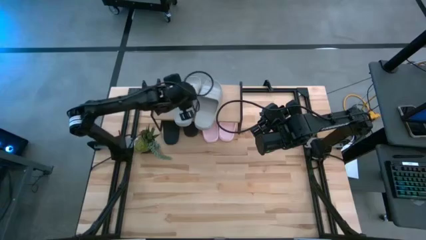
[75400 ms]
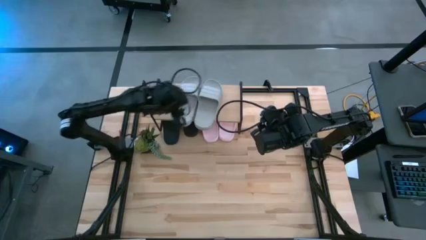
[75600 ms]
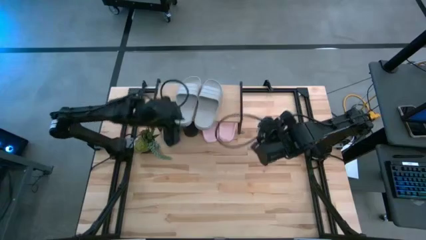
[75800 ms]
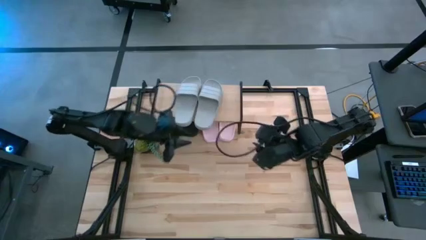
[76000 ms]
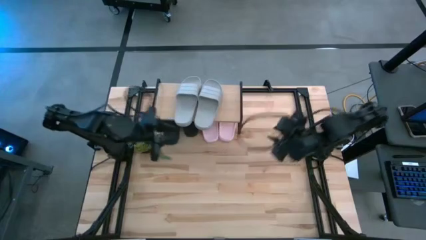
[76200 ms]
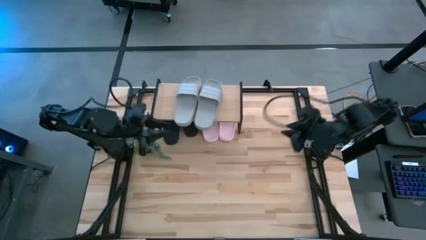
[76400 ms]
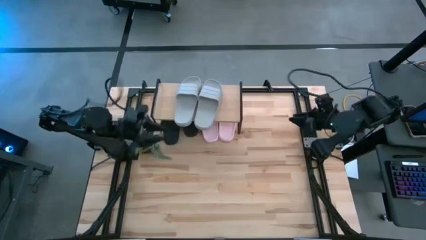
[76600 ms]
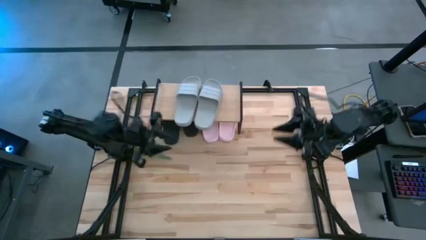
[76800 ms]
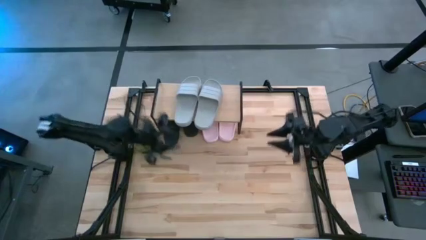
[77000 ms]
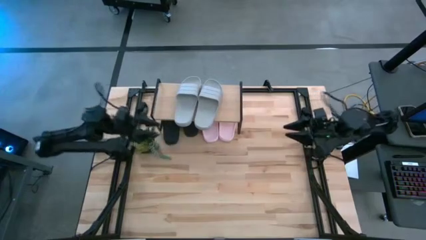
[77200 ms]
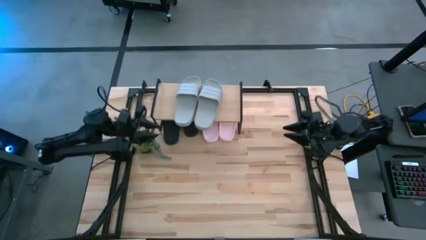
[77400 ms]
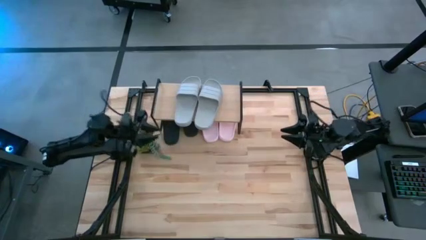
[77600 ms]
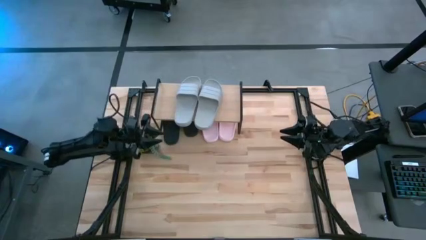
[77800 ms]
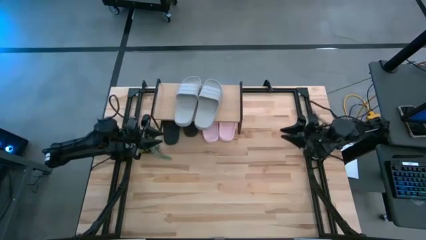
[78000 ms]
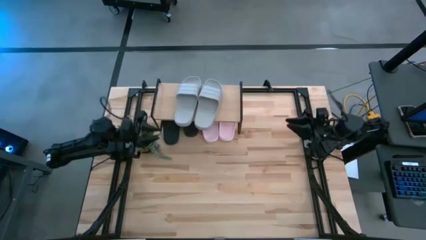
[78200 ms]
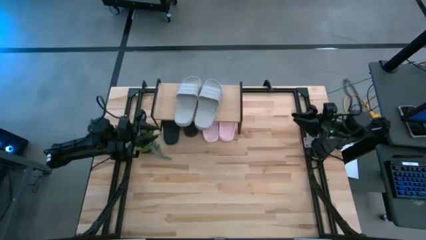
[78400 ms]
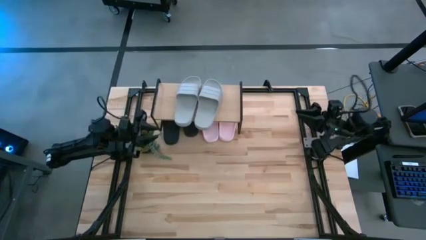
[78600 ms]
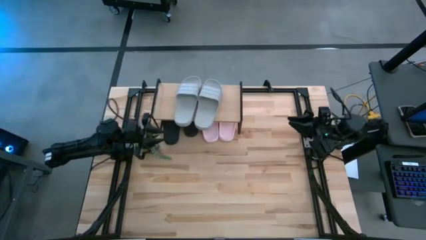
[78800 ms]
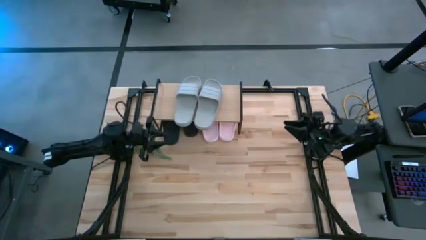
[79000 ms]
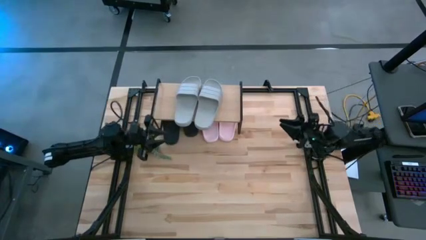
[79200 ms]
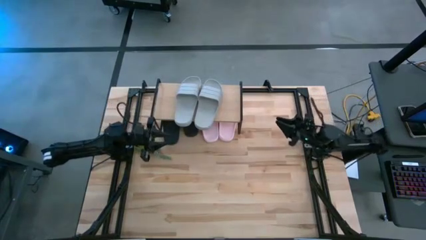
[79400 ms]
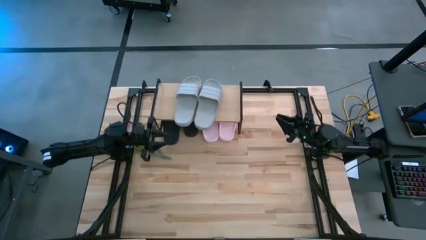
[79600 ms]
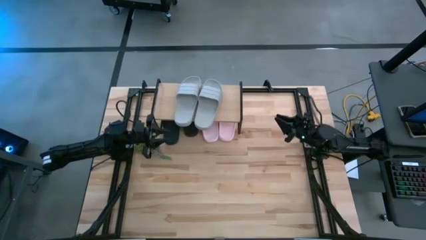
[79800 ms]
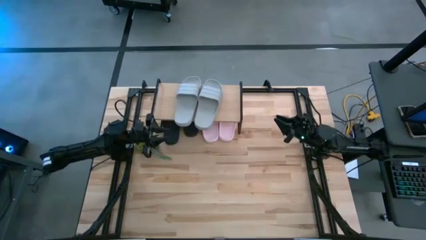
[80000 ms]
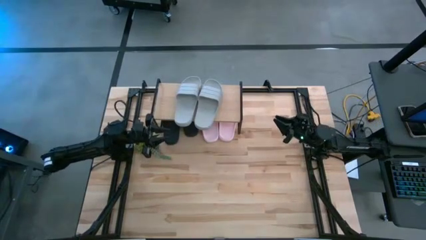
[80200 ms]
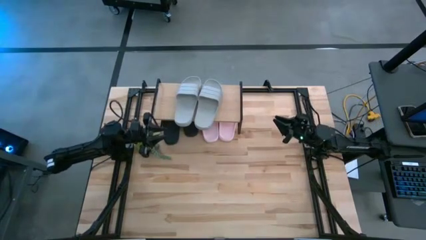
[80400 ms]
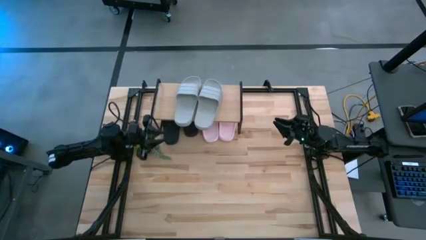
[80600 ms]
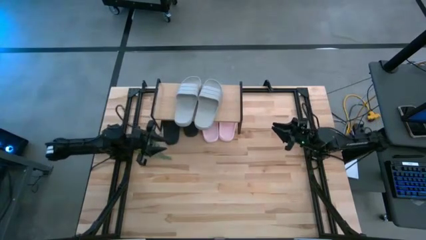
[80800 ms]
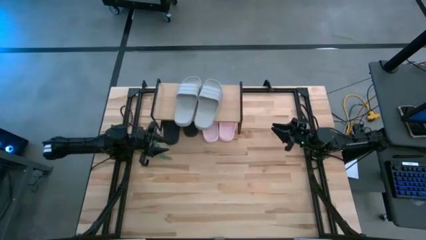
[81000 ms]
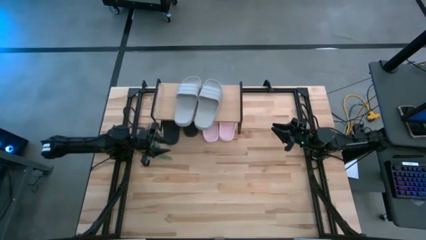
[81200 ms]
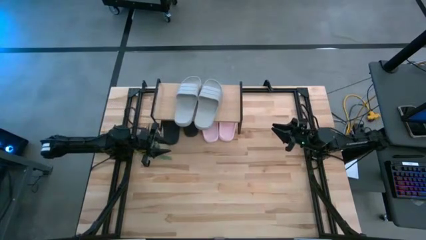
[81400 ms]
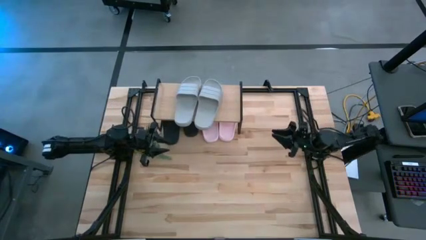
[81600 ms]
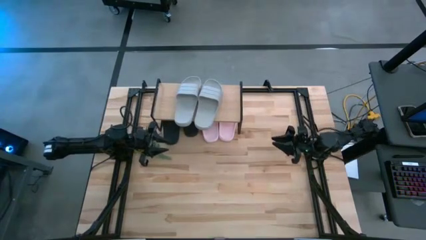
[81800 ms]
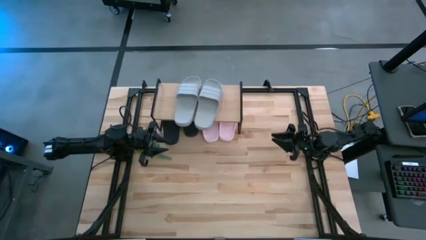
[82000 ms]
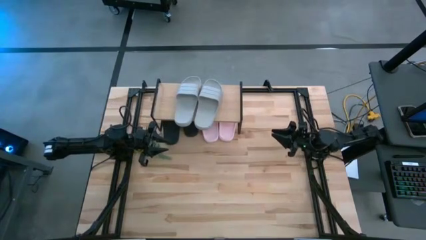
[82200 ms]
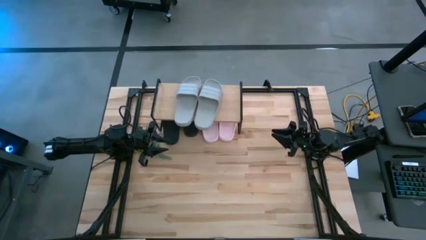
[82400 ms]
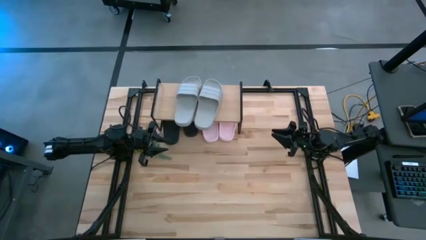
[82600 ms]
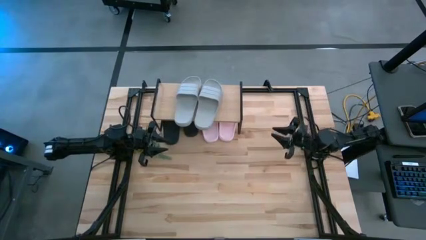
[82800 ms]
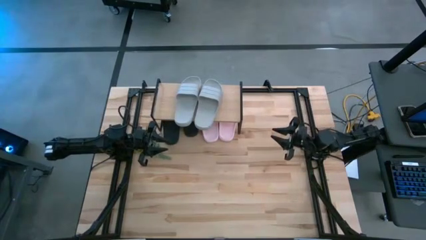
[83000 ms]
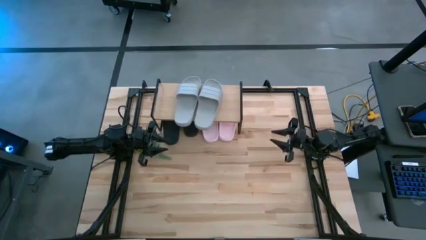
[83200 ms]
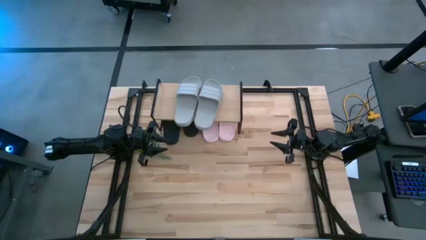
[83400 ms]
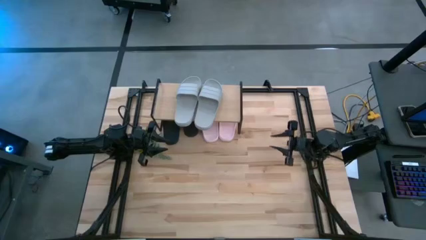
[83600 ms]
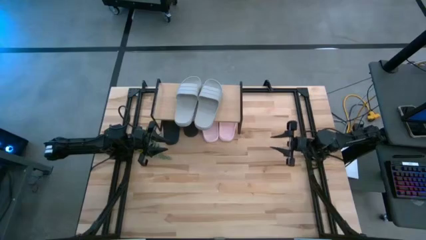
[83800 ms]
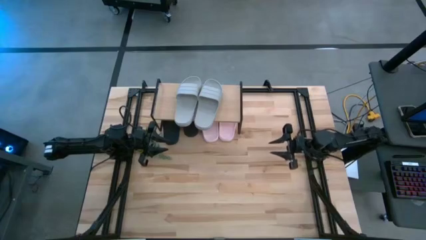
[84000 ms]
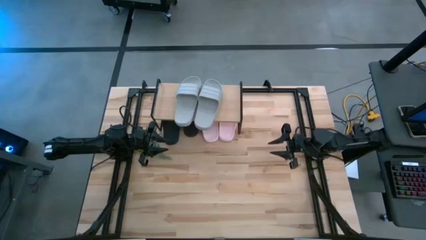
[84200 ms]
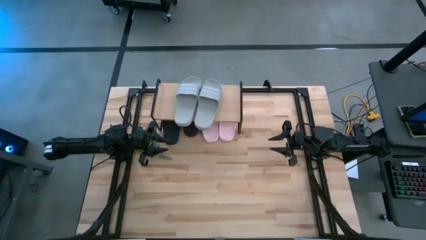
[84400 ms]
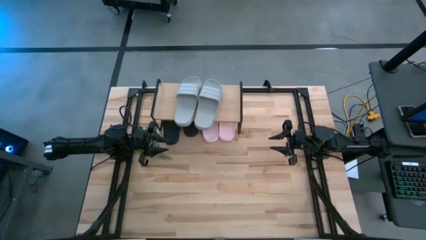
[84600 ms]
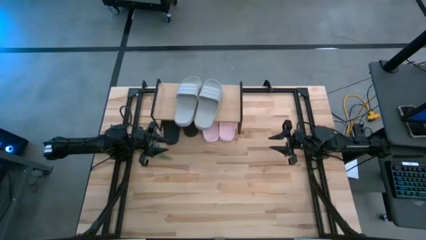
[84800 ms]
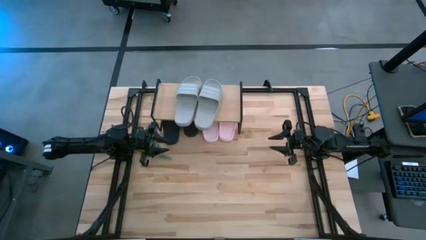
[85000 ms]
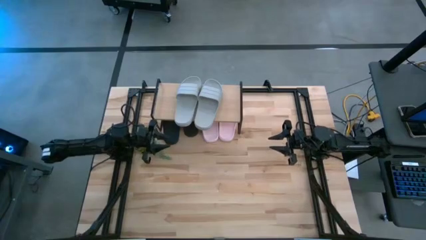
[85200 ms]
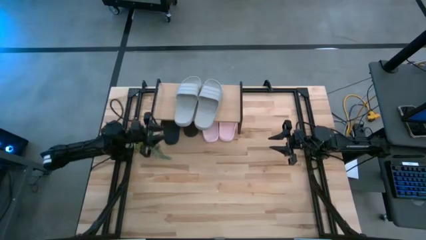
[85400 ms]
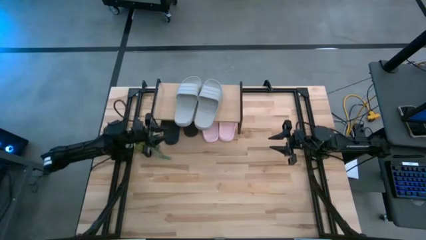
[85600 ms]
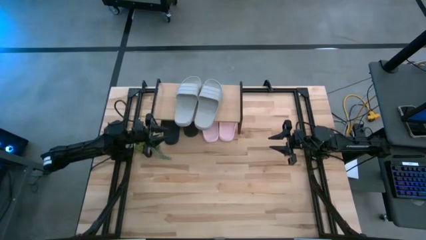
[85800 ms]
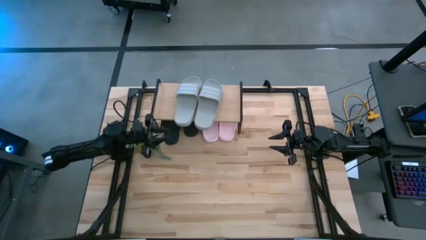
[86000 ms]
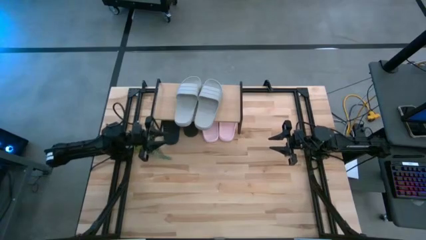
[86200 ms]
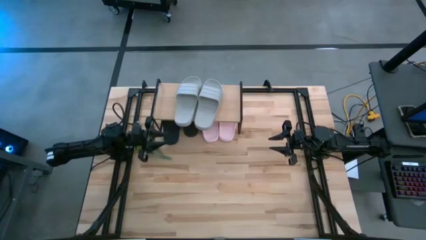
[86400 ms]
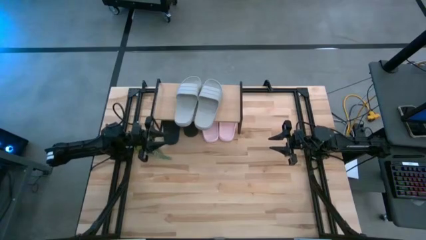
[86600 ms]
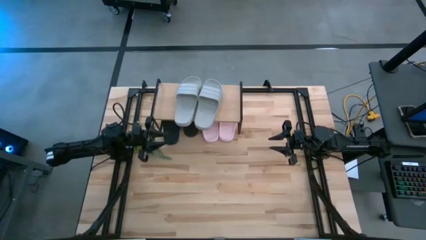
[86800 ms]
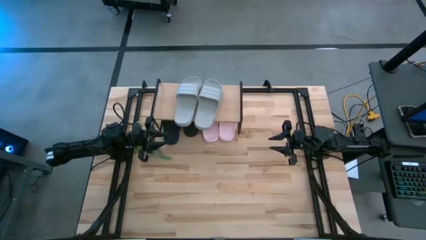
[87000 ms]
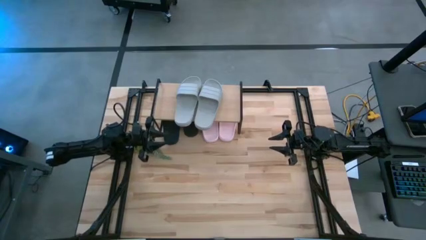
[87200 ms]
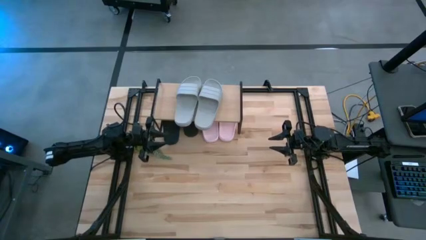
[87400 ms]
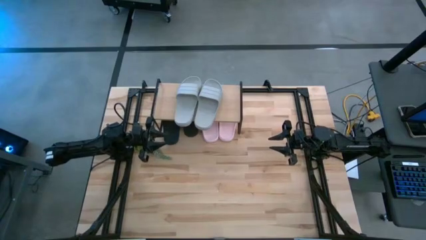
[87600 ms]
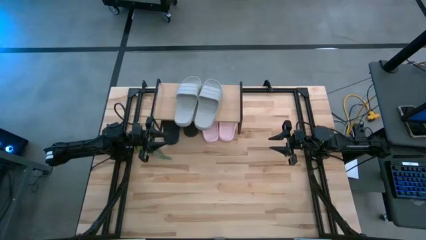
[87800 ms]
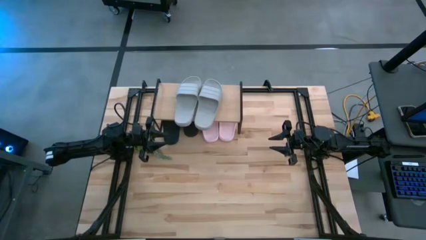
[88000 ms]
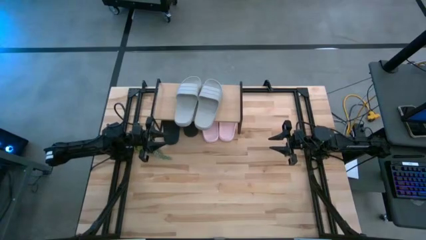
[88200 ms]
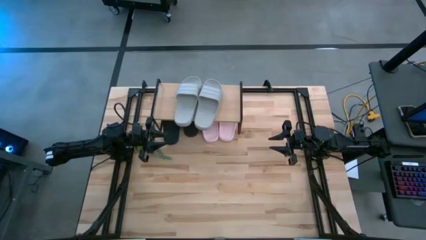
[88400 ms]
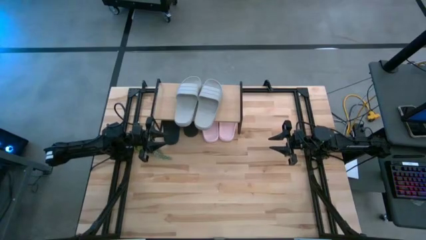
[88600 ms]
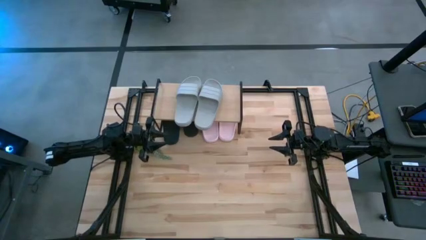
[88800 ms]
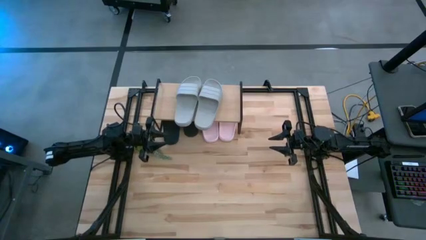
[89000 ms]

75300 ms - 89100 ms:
Task: Pick and place slides into the shelf
Return to Home Position

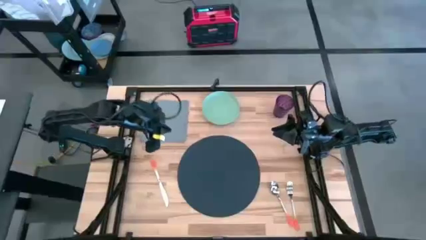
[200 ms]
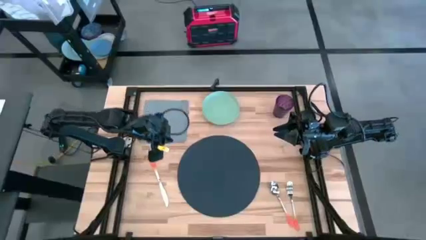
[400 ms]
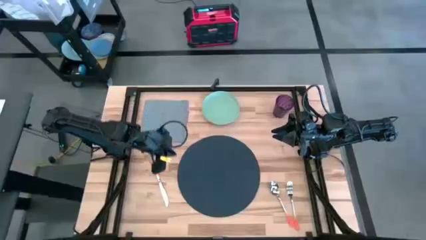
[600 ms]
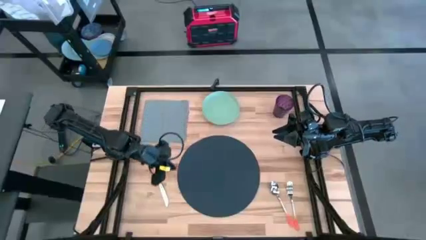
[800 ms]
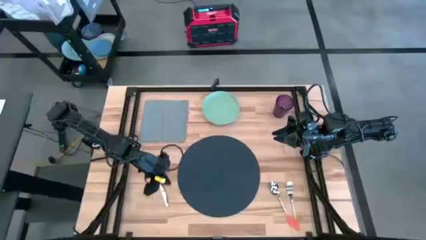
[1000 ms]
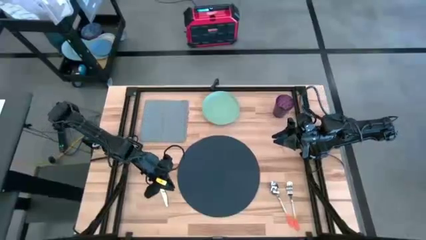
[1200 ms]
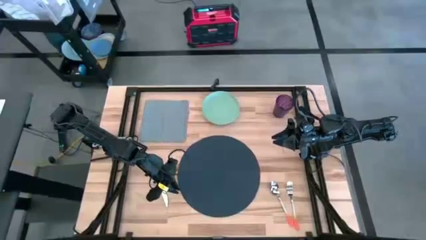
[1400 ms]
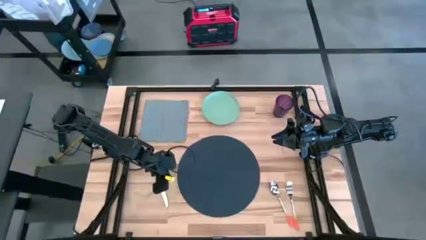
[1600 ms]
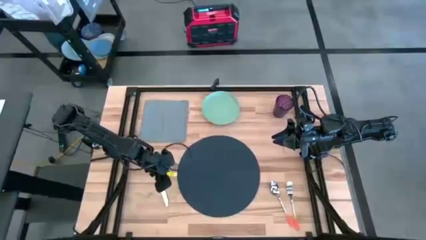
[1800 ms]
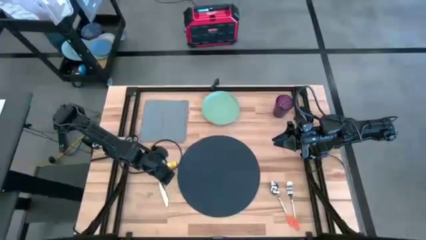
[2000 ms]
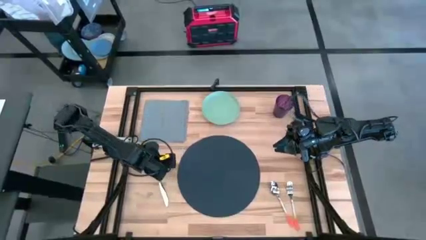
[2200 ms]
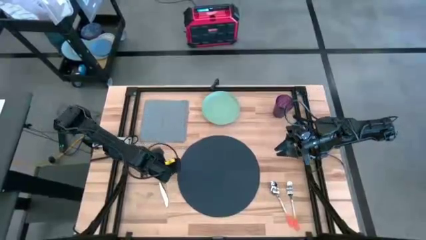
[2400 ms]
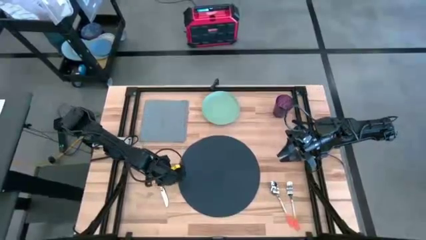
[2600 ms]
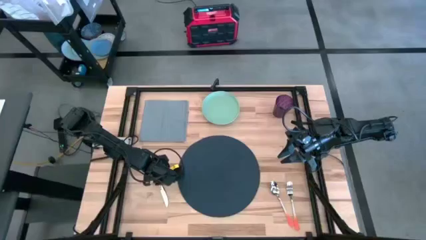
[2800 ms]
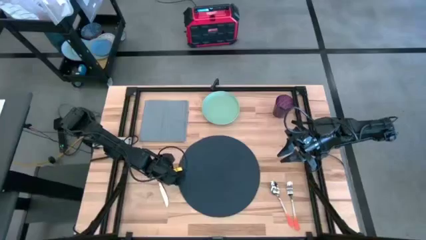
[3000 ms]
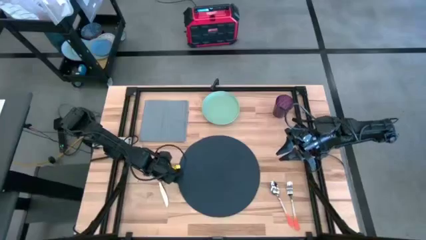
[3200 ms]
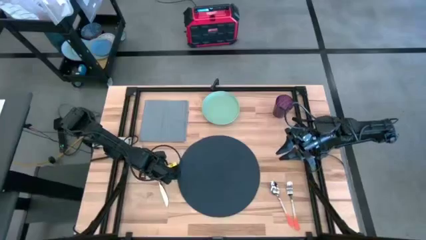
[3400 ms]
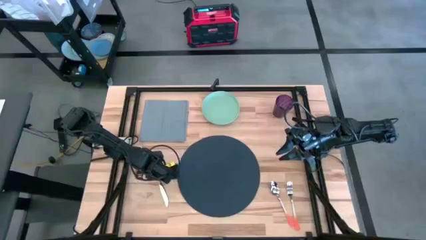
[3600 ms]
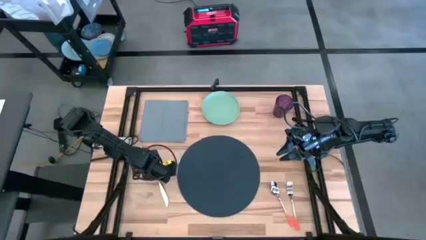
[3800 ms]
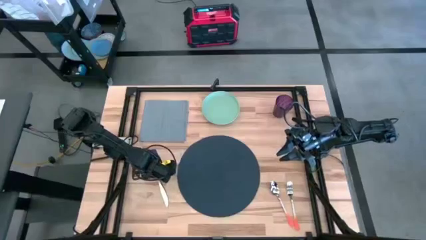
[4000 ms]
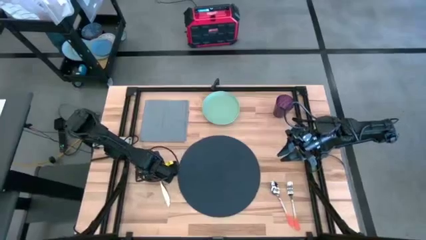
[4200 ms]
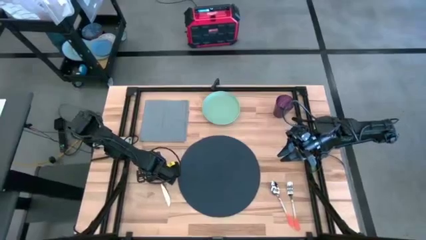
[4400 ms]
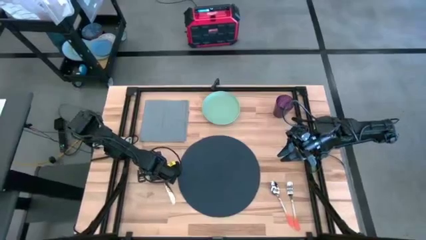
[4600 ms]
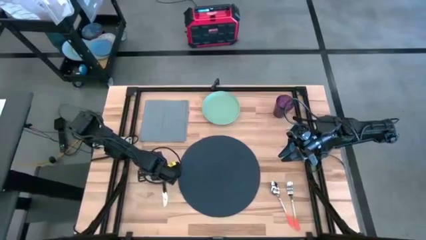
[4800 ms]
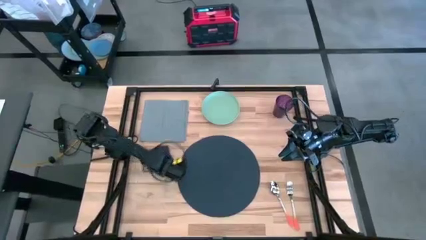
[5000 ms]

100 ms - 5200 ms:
Task: Set table place
Put the orange table knife on the dark gray placemat
